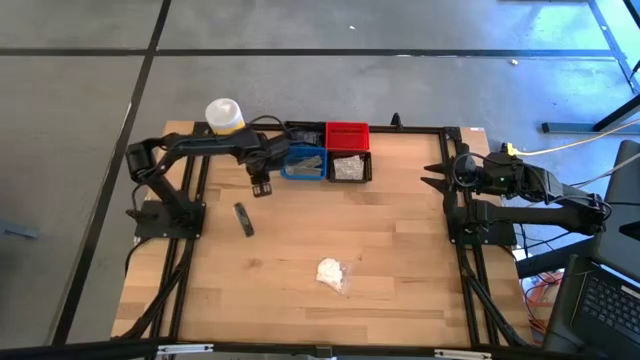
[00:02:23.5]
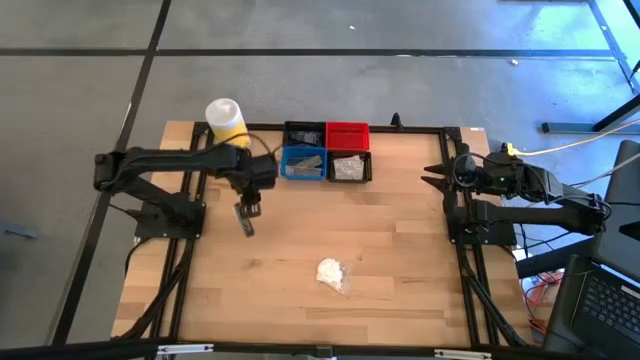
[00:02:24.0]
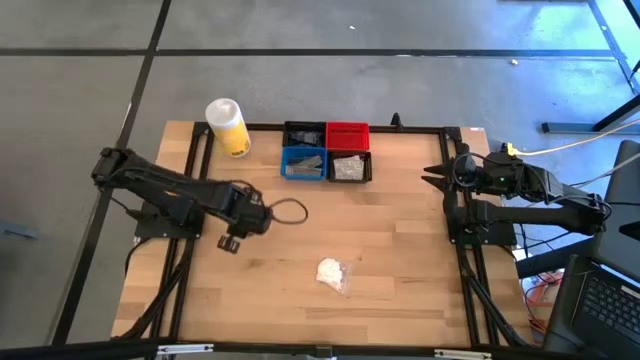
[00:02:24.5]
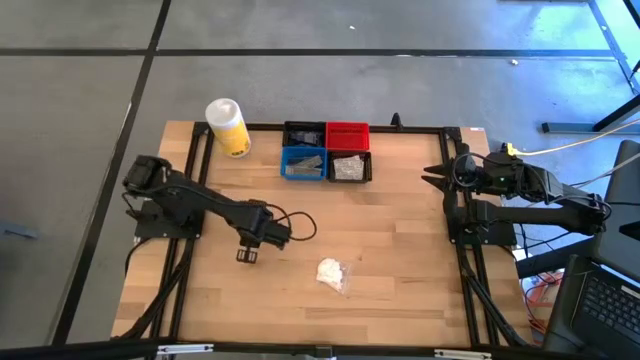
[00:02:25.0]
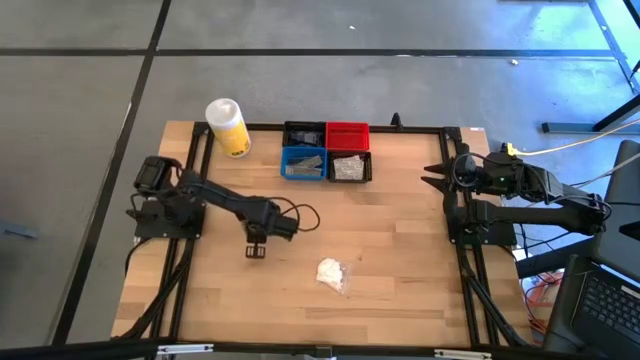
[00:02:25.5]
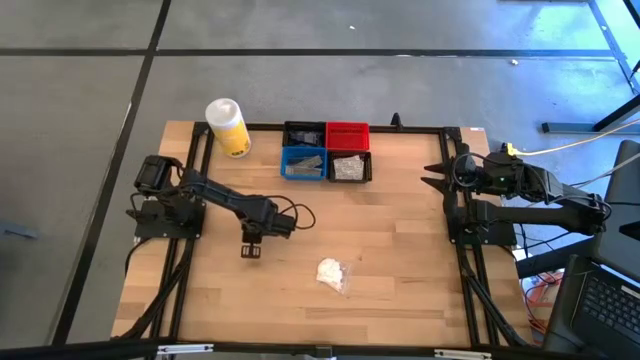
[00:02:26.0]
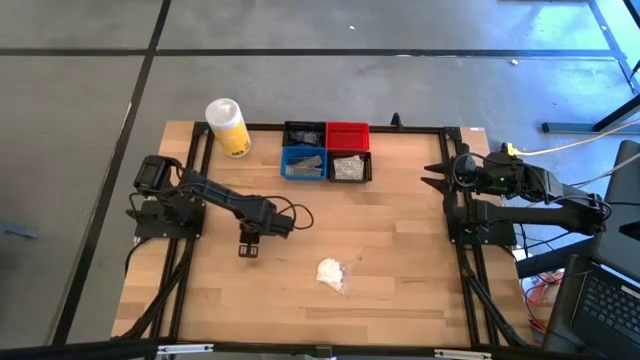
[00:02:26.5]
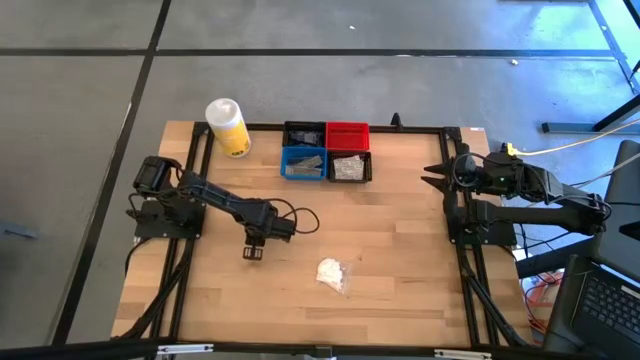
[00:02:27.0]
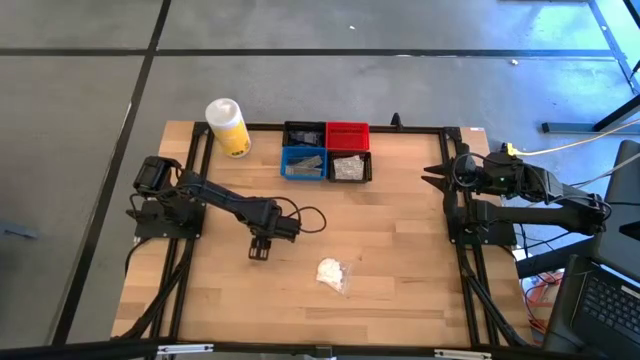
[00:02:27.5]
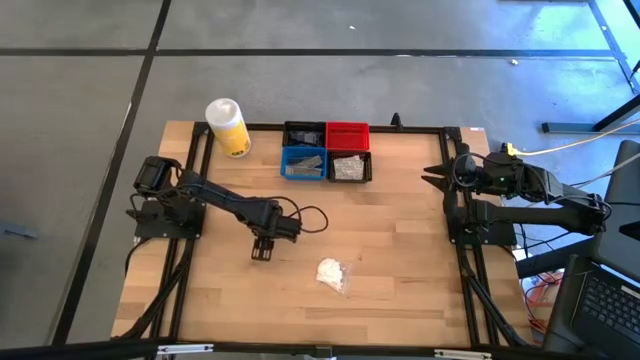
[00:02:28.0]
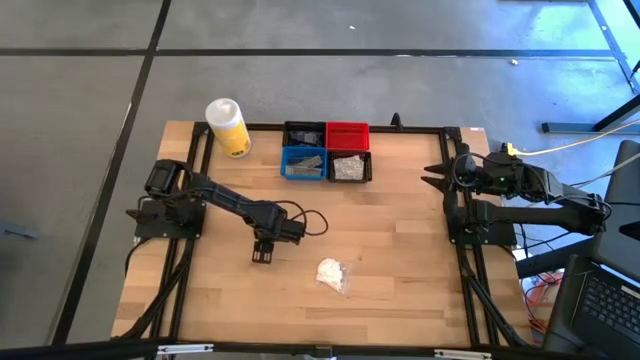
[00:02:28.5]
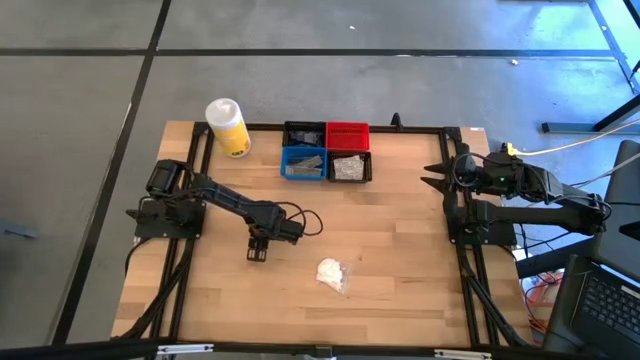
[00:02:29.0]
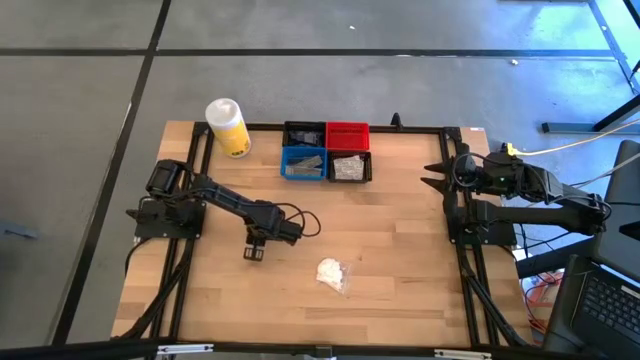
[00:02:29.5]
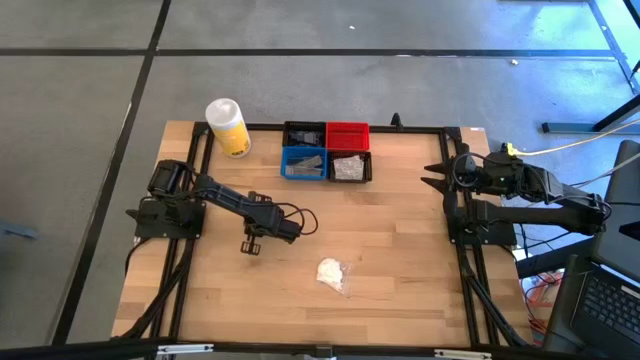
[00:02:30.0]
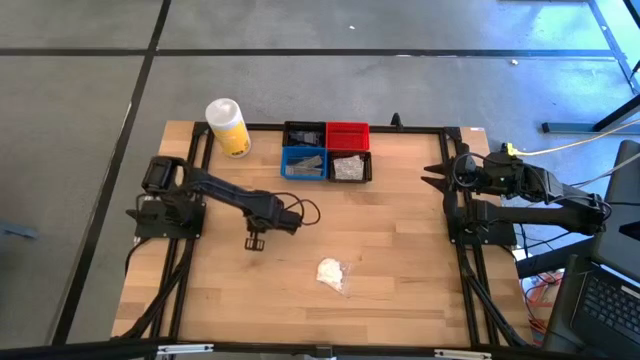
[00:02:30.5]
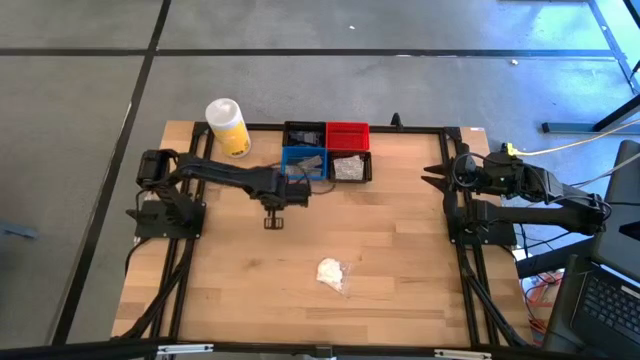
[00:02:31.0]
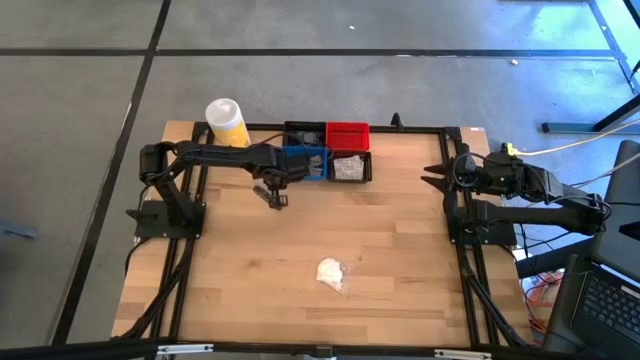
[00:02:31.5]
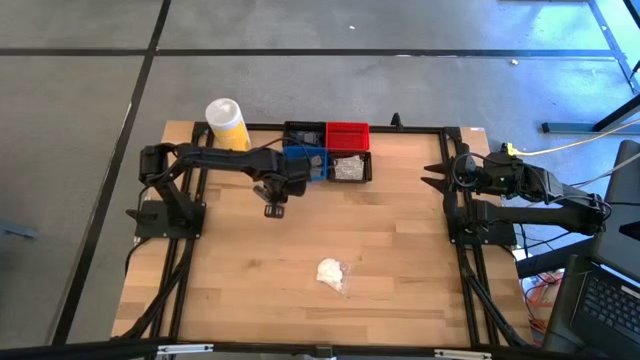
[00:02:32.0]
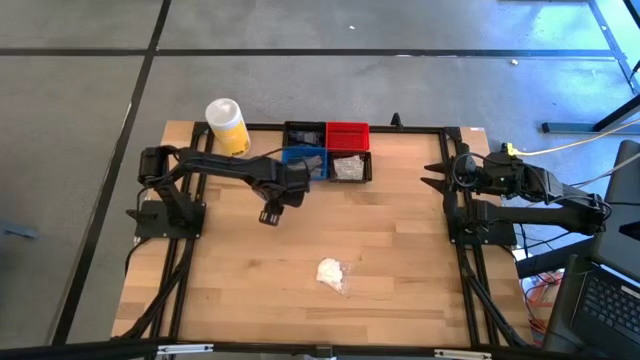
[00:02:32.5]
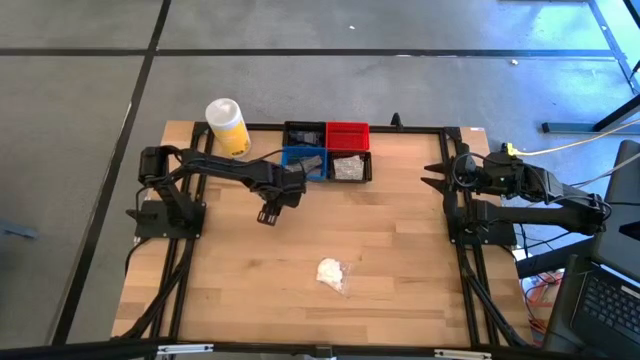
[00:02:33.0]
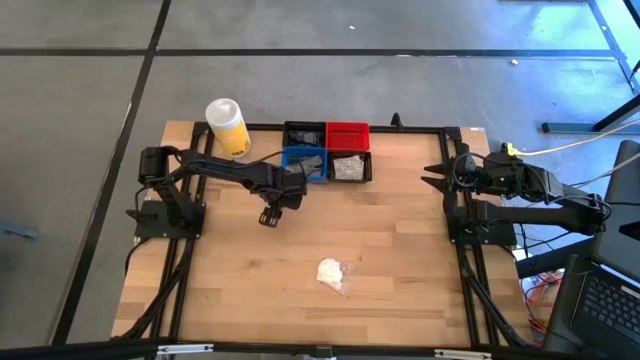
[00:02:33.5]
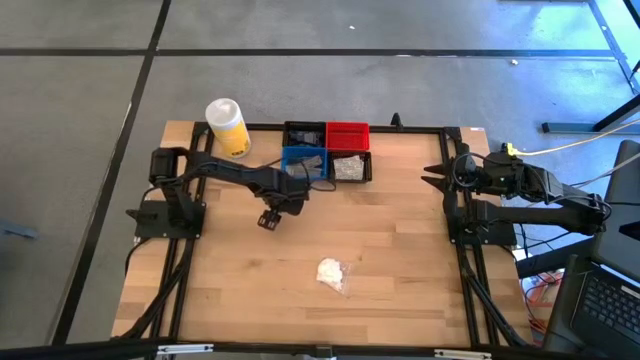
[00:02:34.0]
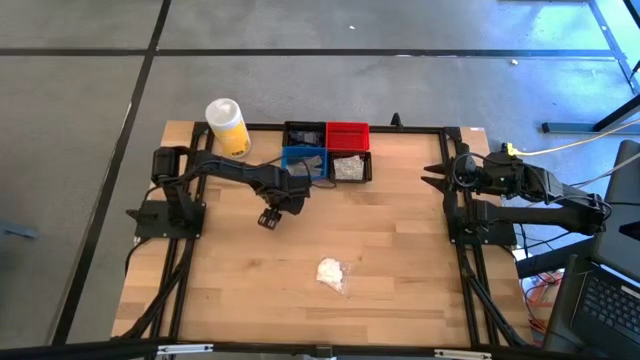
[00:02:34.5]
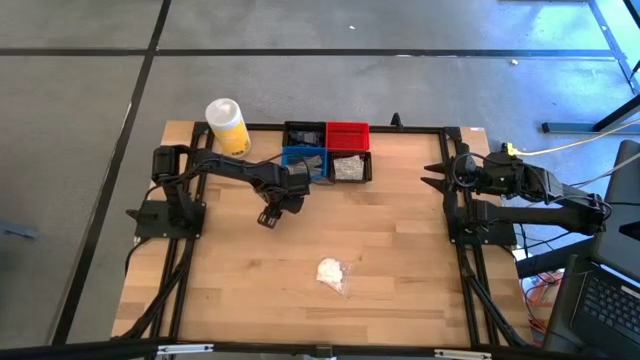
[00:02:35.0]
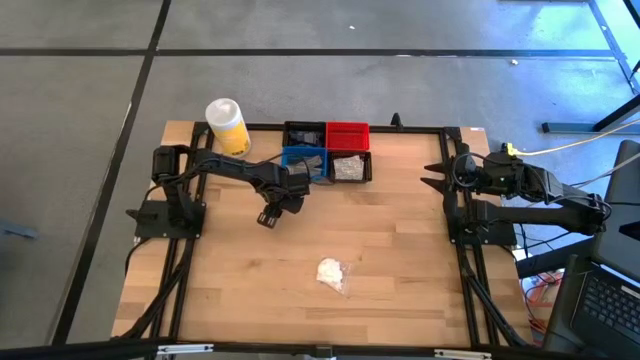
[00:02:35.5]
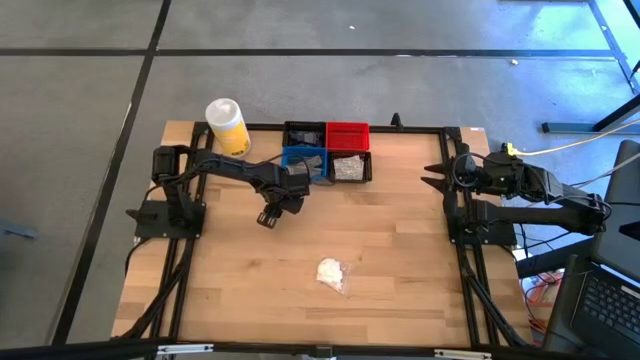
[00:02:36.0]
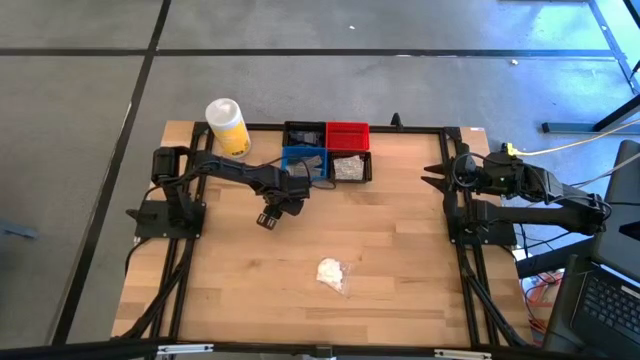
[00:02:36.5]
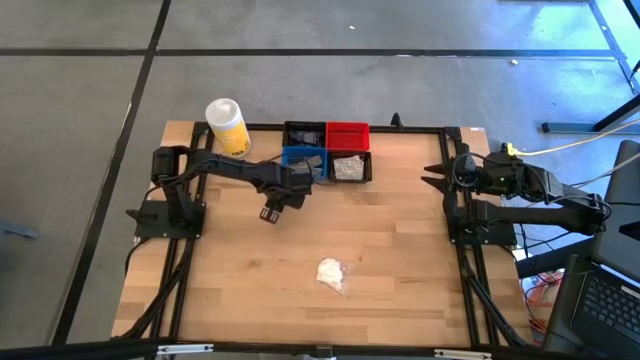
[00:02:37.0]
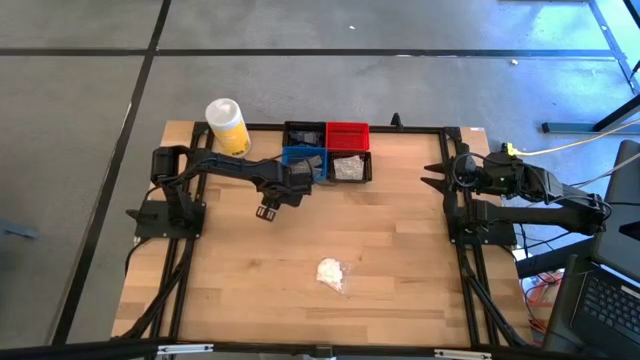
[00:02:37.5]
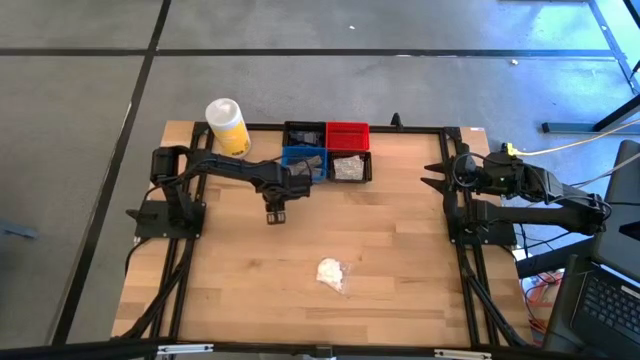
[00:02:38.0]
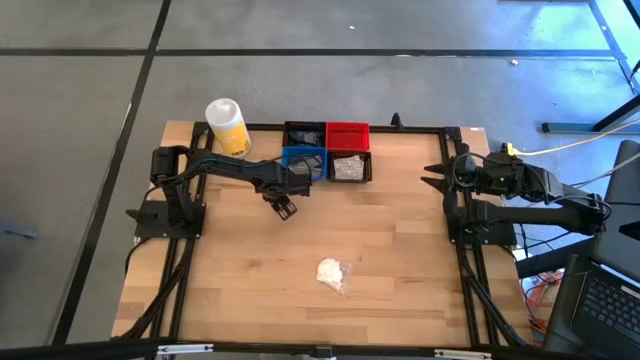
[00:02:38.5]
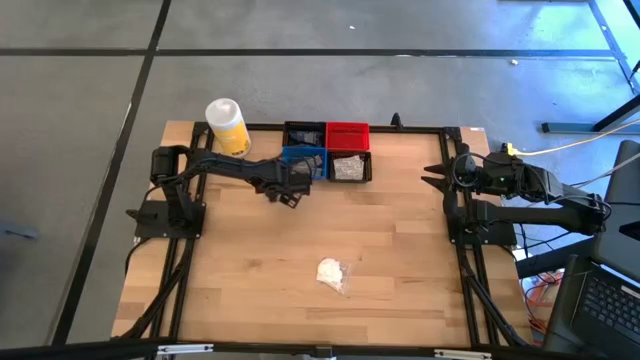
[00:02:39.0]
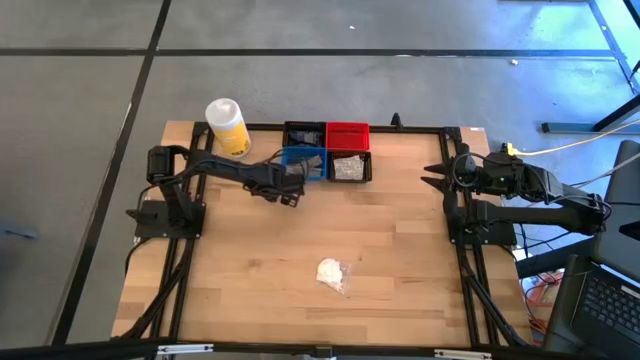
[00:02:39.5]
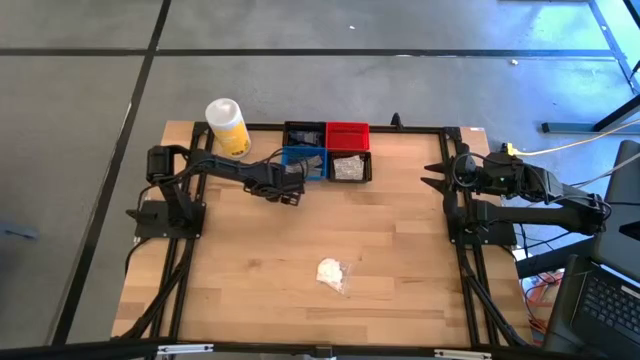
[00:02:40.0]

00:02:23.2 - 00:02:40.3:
Task: Pick & Place Travel size toiletries
Put the comb into the blue bin

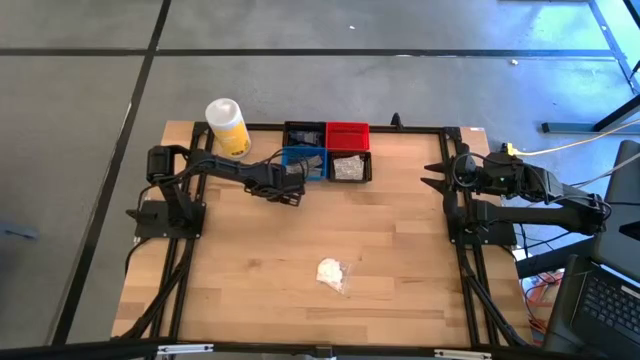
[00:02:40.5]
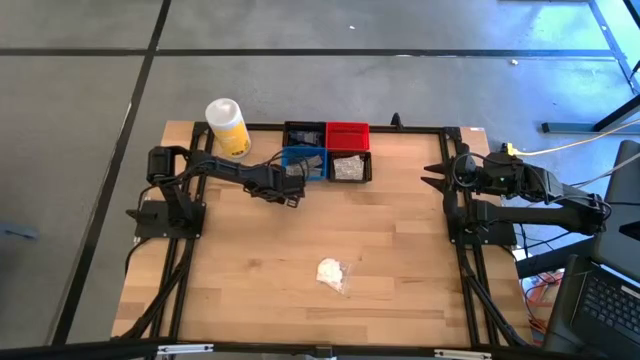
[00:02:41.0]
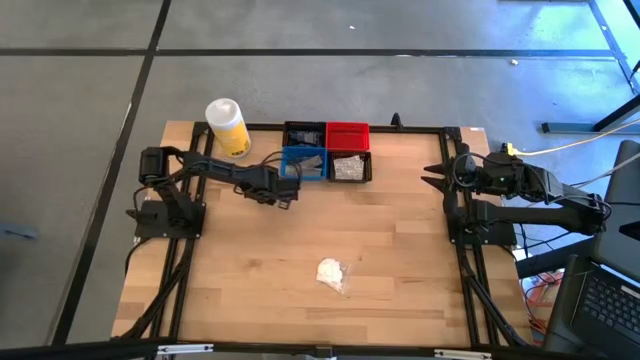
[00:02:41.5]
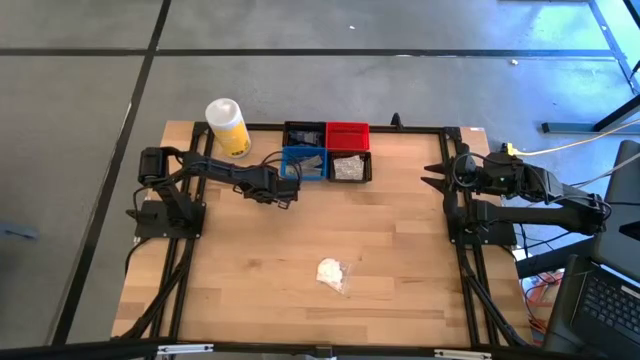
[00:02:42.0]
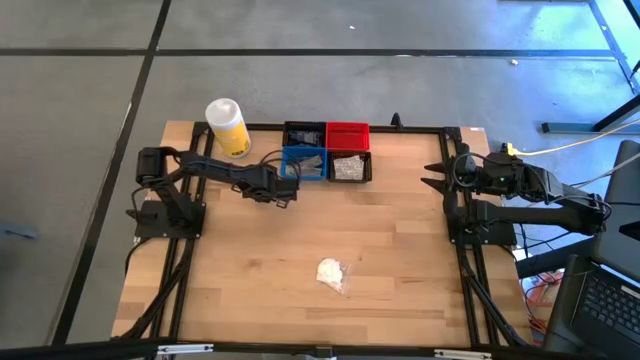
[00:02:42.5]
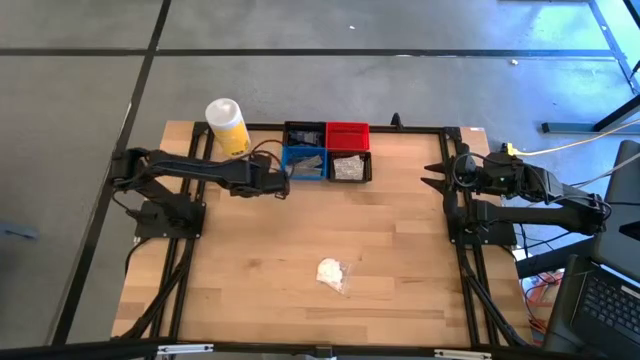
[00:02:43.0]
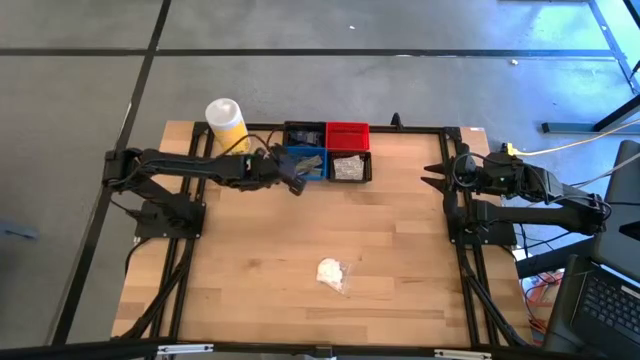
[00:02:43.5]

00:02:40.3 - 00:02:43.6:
Put the comb into the blue bin
